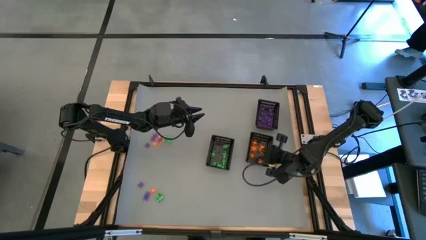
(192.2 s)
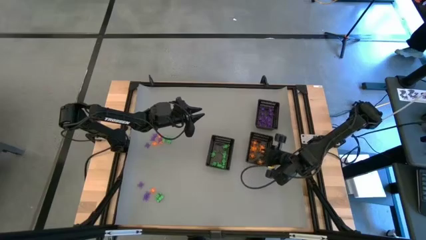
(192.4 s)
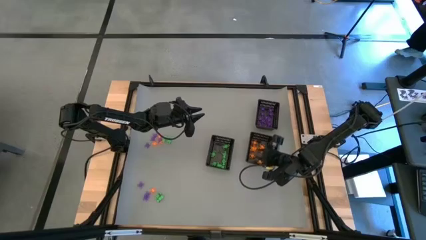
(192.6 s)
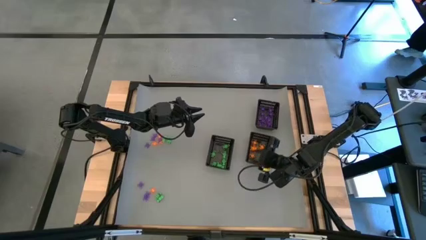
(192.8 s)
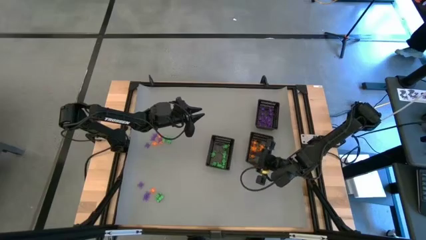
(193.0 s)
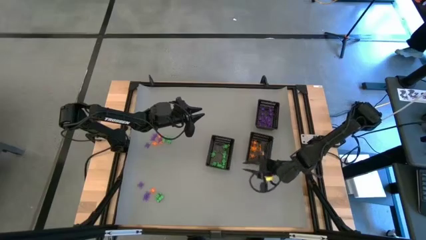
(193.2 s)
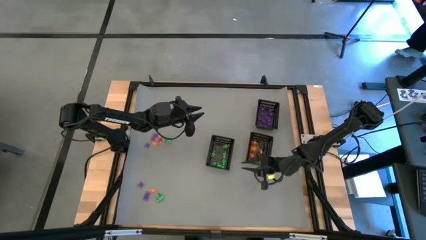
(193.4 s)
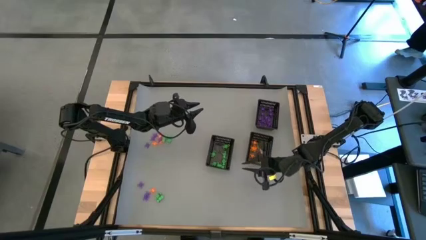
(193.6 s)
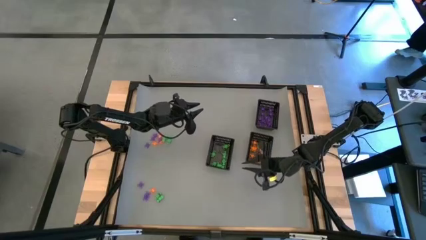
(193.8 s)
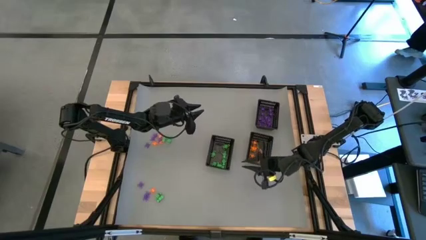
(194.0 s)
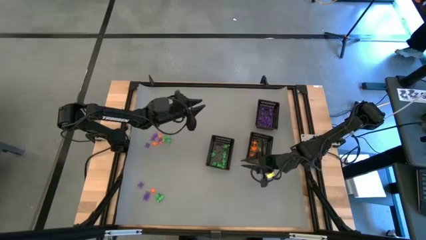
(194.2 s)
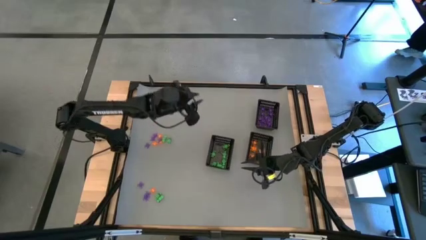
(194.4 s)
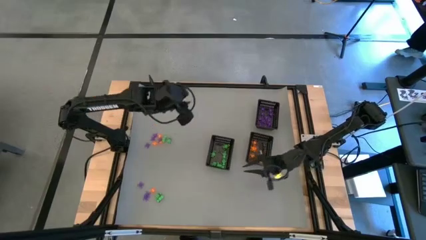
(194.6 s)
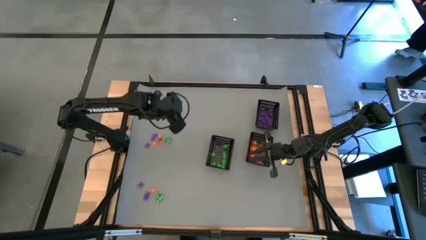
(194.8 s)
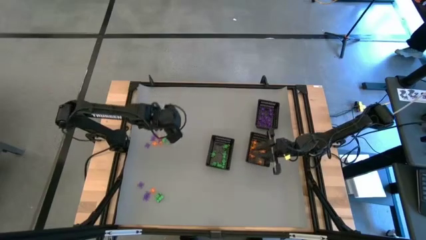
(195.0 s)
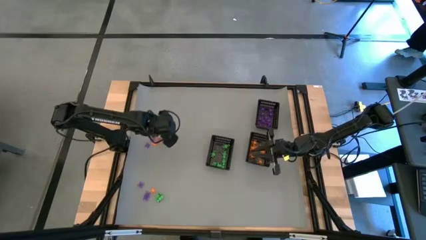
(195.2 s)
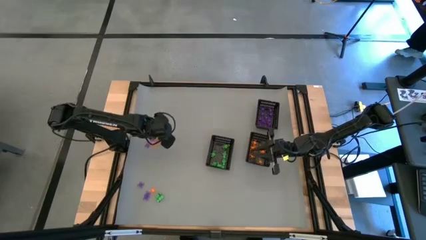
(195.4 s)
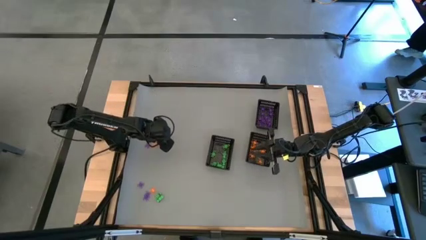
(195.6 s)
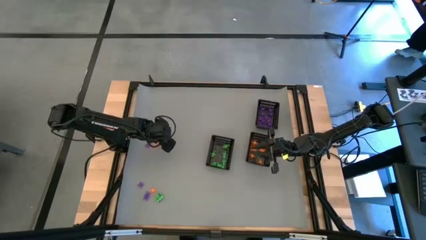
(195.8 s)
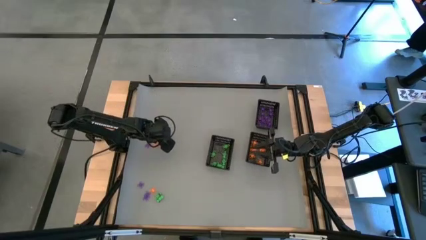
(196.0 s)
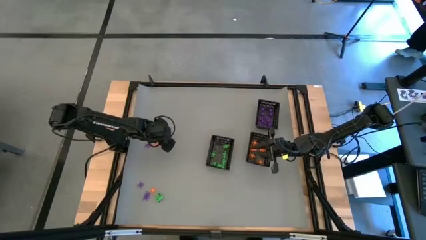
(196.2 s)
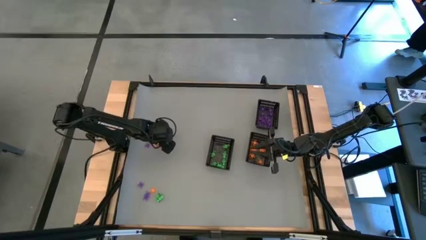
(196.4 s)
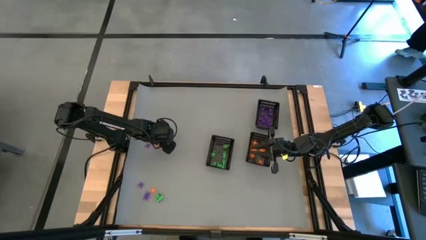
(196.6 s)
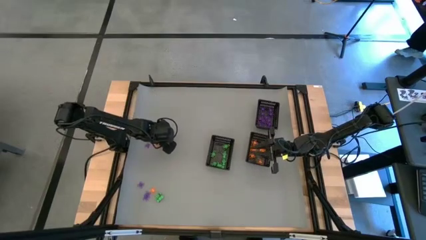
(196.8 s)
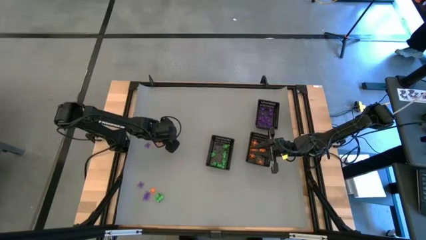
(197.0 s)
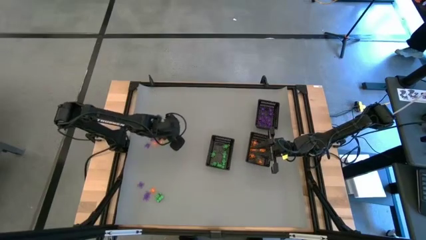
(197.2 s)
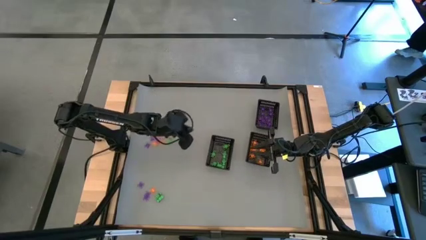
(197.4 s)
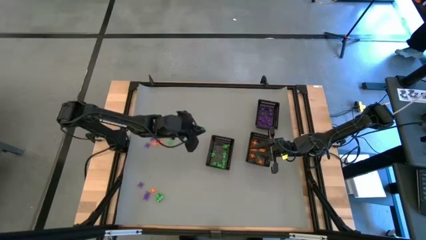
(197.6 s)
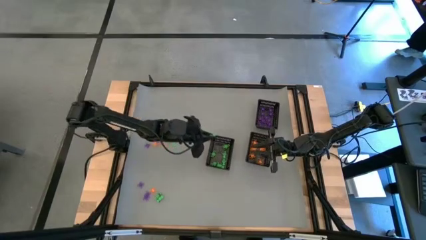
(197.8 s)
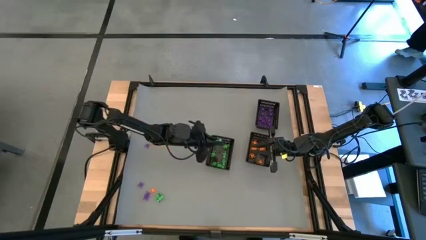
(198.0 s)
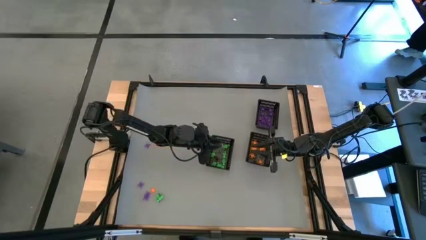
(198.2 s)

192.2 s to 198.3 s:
Task: Sort Halloween decoration
Put the green skeleton toy into the bottom left bin

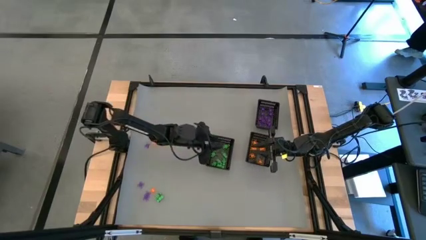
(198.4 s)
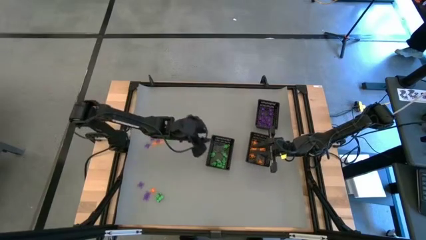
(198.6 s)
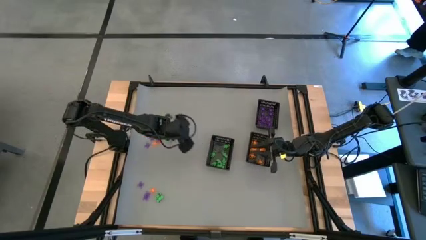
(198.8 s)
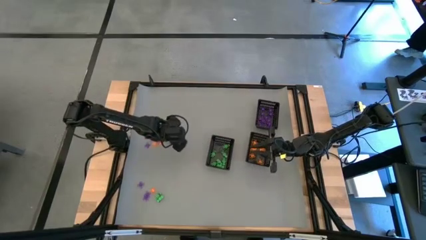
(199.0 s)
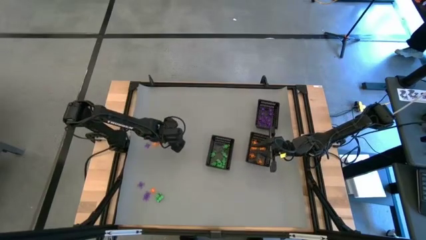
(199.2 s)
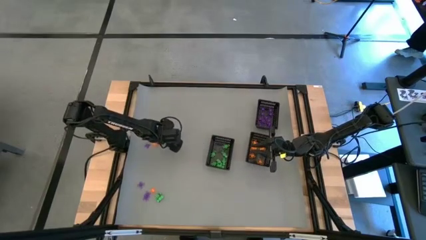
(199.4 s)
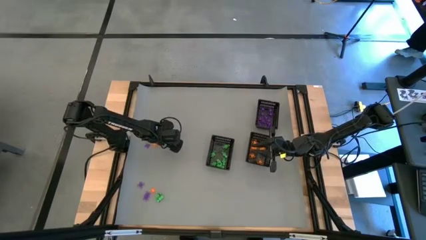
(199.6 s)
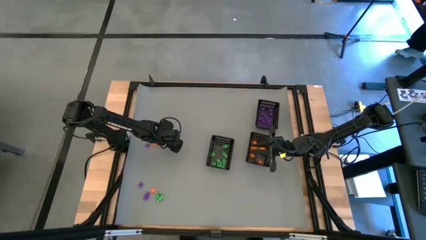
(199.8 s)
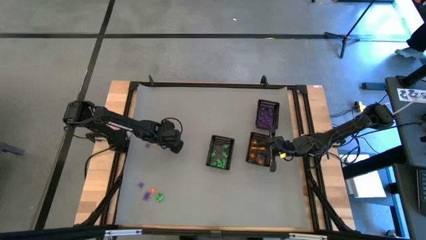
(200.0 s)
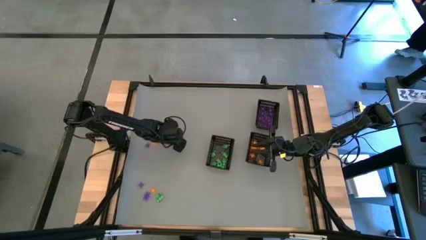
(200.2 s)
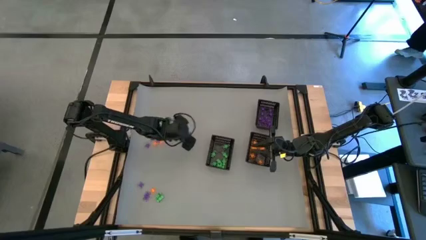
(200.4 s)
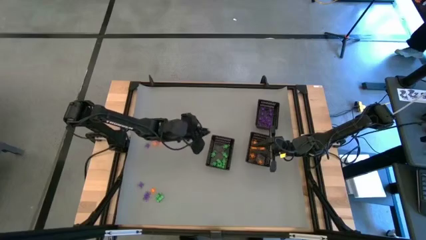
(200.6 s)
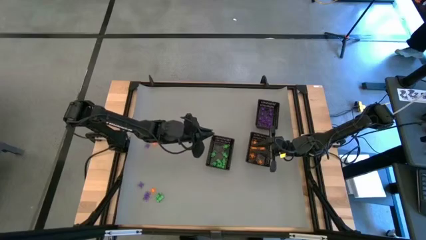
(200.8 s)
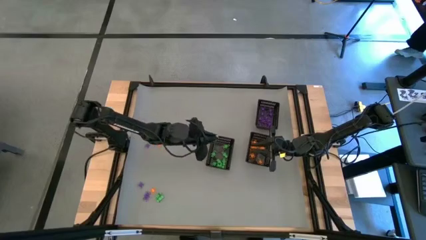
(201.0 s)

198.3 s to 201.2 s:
Put the top green skeleton toy into the bottom left bin

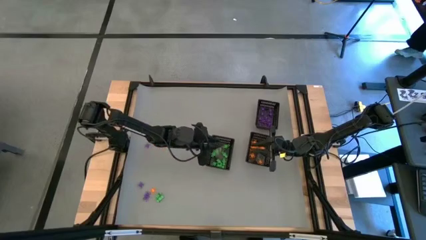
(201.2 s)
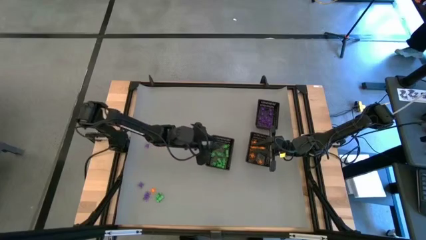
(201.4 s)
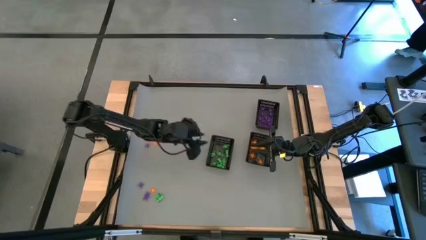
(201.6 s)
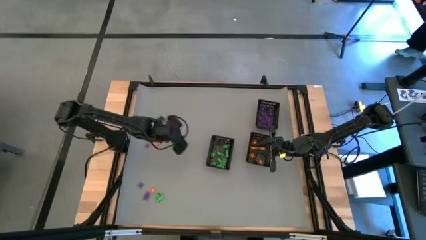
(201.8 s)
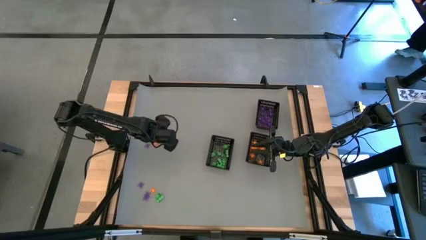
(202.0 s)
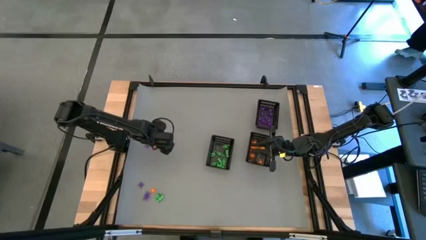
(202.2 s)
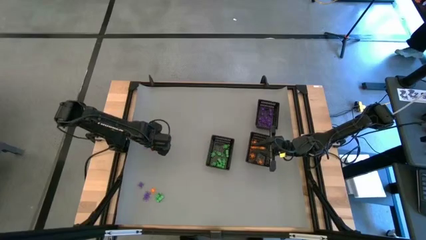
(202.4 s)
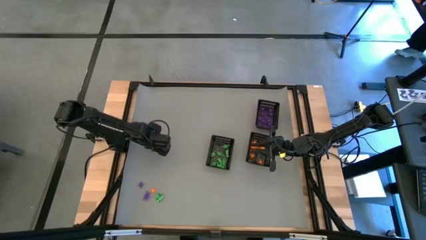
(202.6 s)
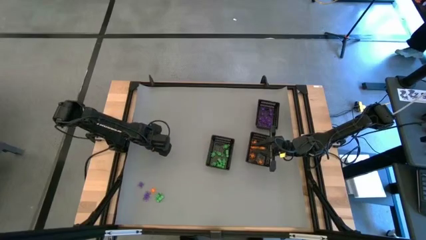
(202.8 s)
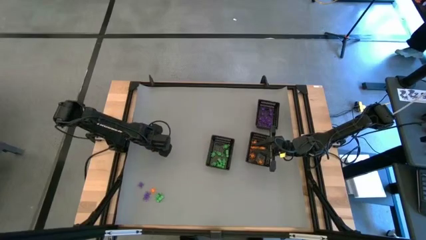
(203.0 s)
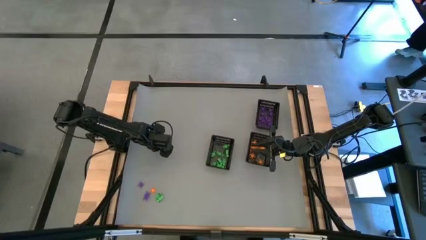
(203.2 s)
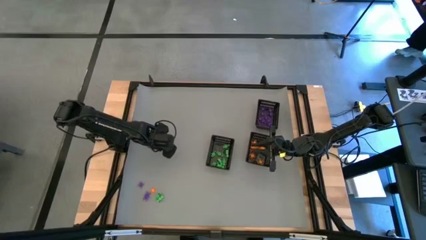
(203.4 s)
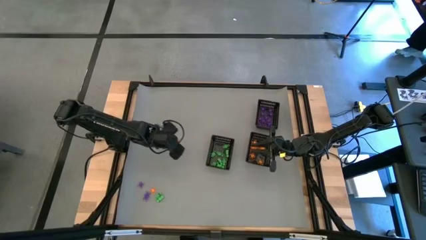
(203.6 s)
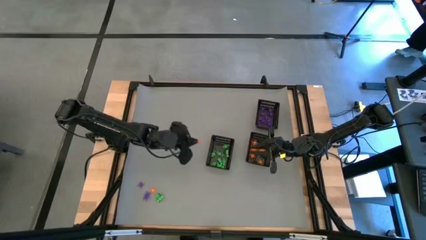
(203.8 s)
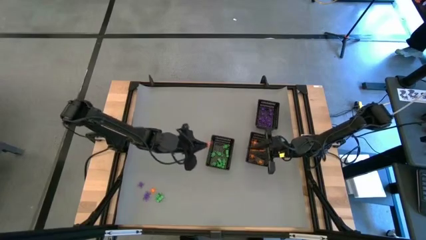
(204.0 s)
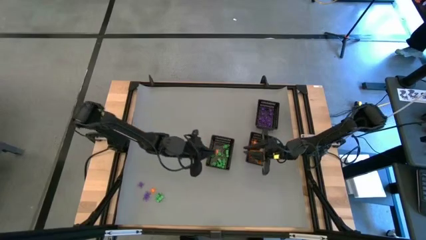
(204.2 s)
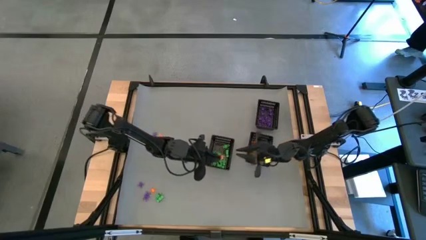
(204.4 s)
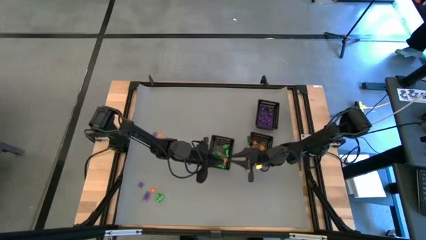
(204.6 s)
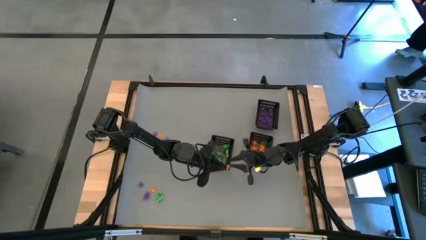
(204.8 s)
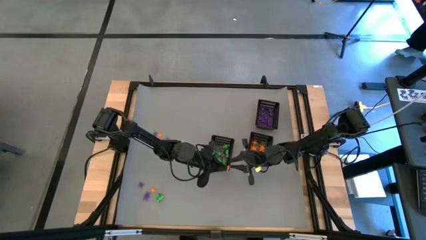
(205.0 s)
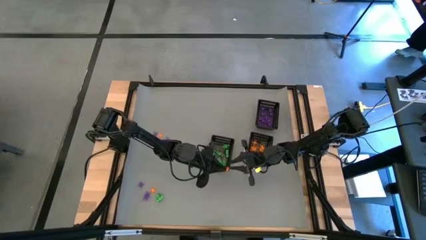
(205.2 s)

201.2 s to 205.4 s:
Put the orange spider toy into the bottom right bin

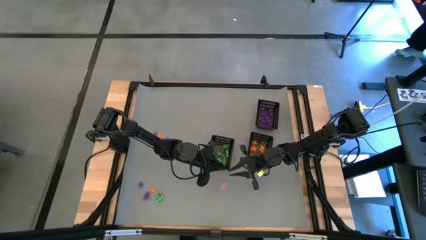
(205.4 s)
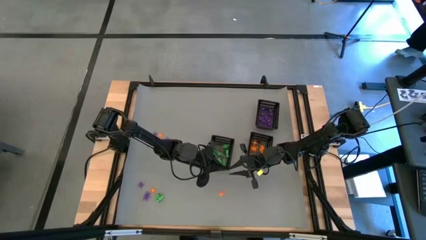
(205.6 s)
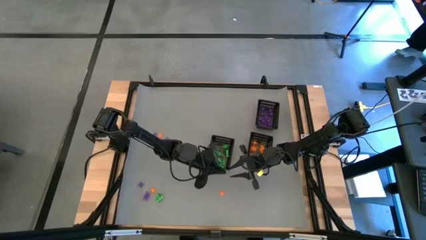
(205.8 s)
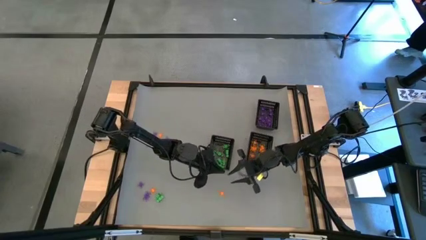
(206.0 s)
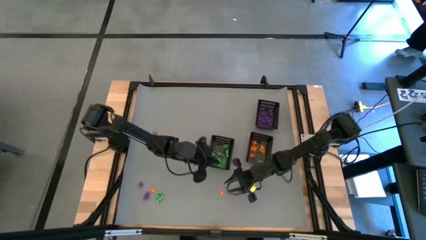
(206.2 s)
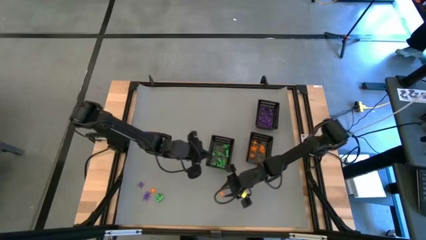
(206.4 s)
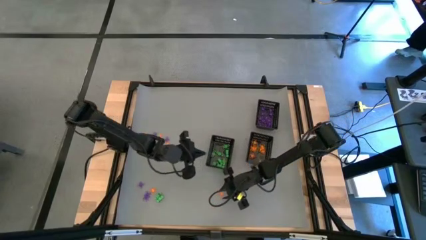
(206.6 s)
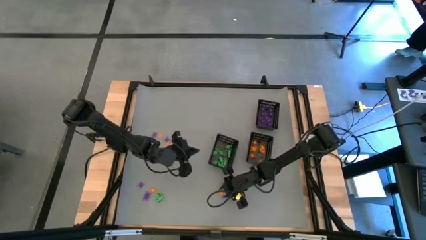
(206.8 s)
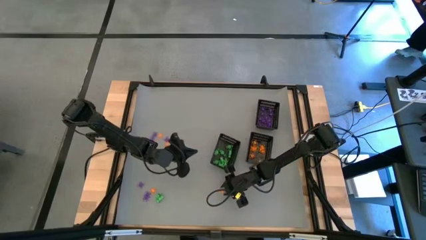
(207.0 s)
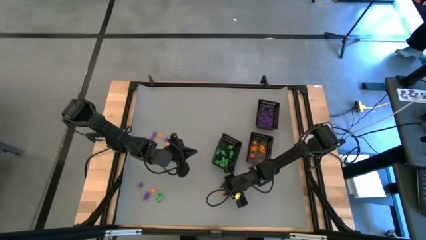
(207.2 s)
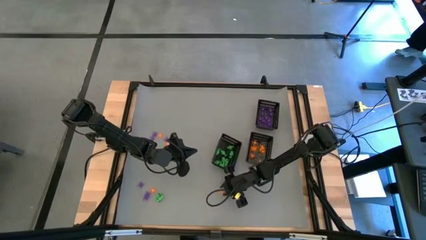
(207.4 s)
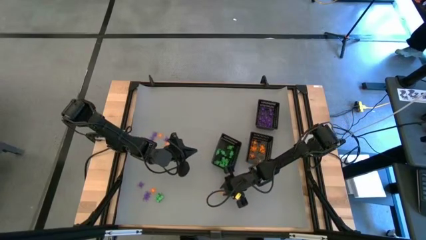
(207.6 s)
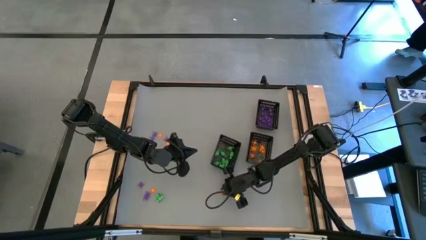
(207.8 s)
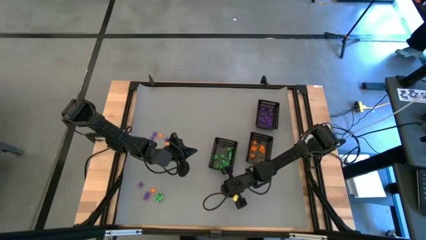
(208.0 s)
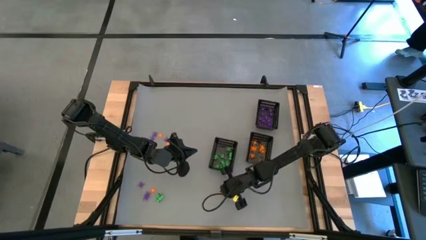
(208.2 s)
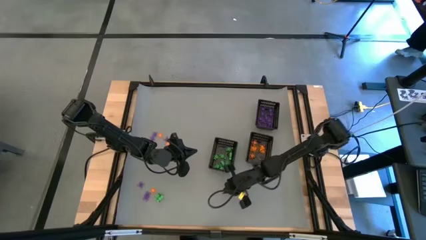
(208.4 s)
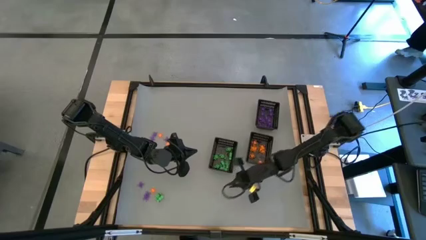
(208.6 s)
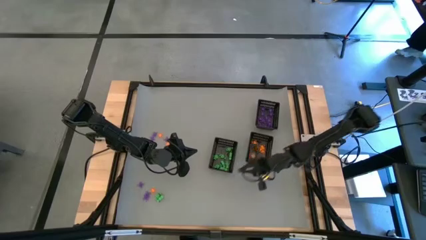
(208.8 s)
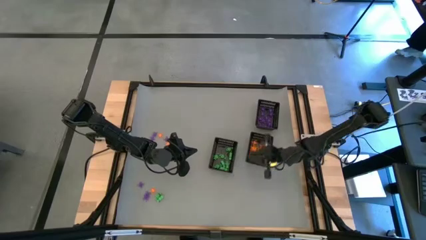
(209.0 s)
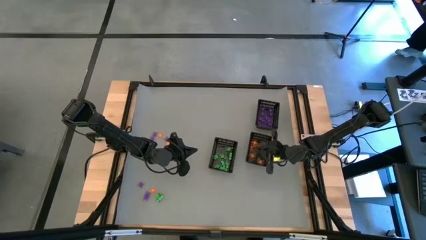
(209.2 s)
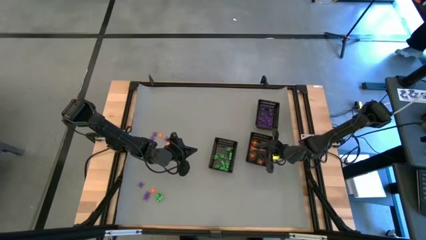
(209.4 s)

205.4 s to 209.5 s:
Put the orange spider toy into the bottom right bin
